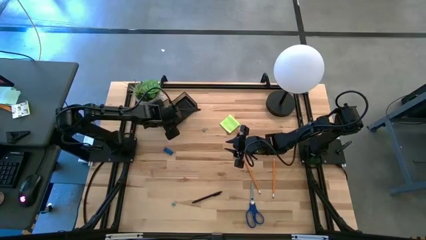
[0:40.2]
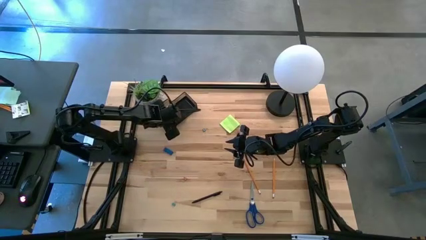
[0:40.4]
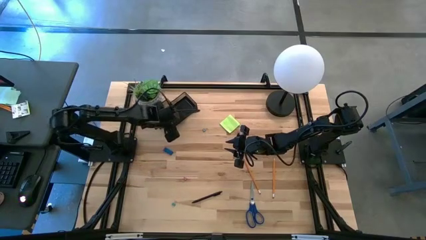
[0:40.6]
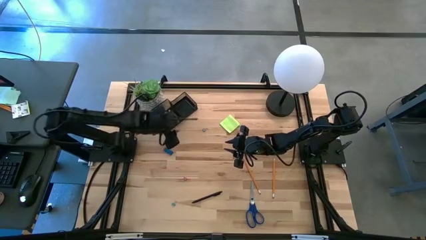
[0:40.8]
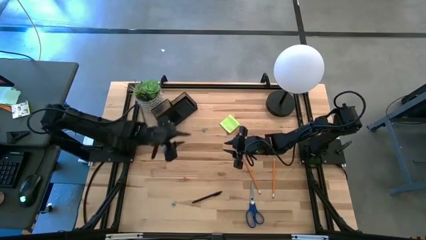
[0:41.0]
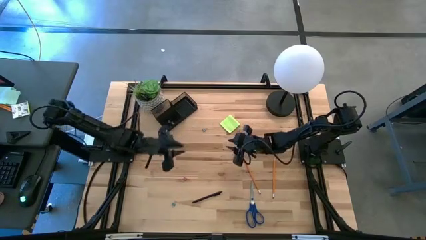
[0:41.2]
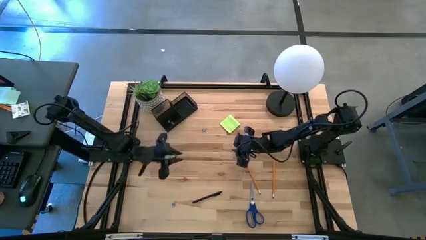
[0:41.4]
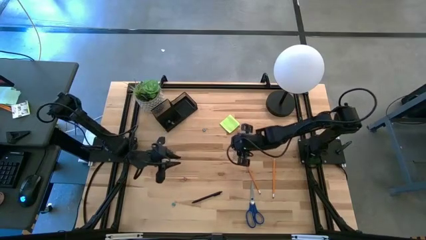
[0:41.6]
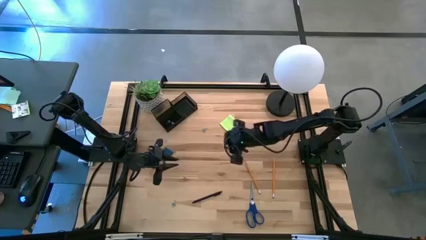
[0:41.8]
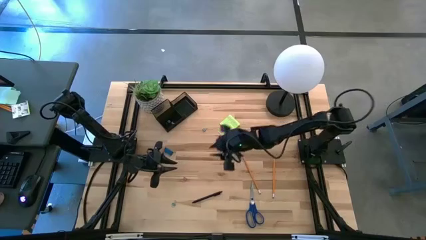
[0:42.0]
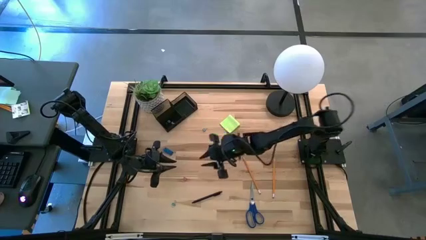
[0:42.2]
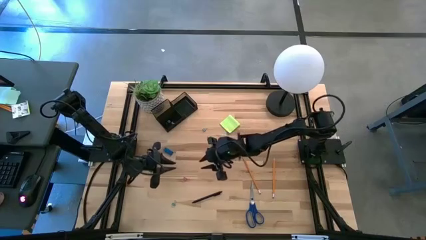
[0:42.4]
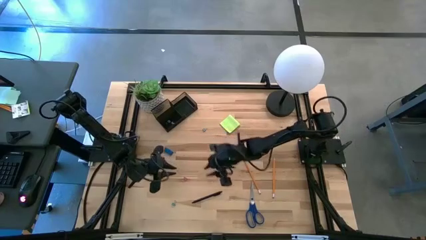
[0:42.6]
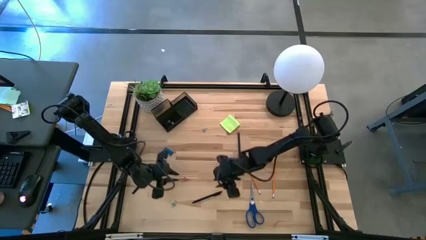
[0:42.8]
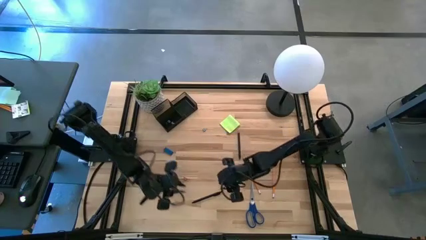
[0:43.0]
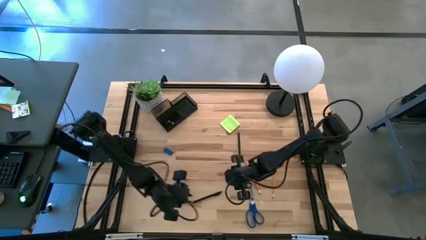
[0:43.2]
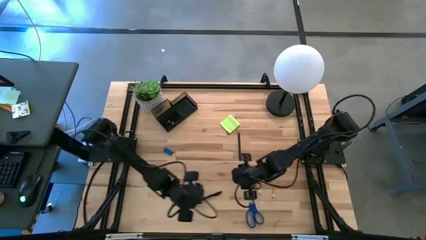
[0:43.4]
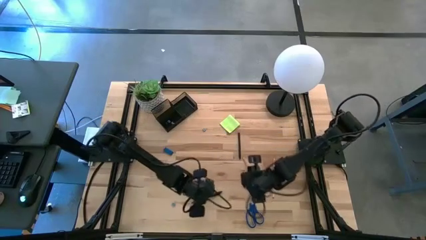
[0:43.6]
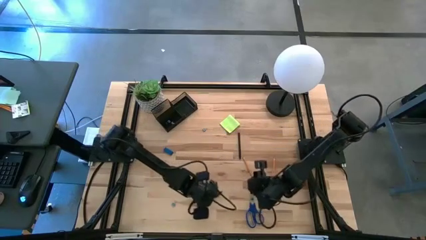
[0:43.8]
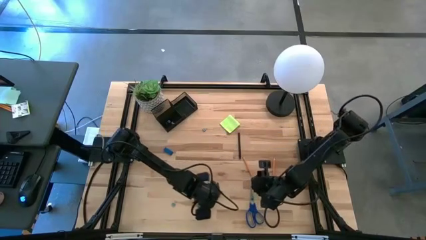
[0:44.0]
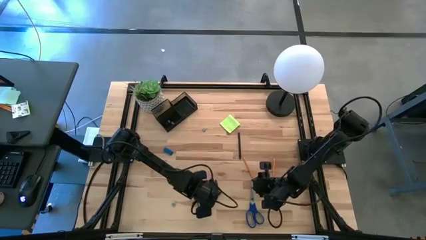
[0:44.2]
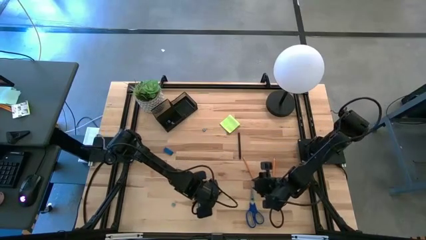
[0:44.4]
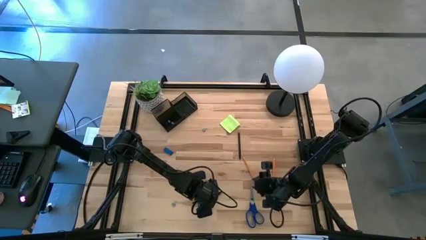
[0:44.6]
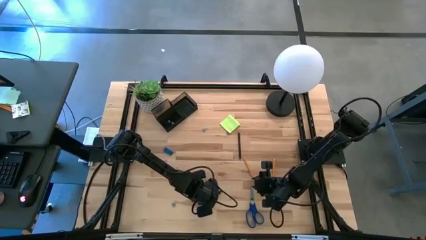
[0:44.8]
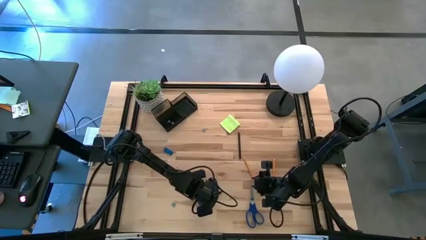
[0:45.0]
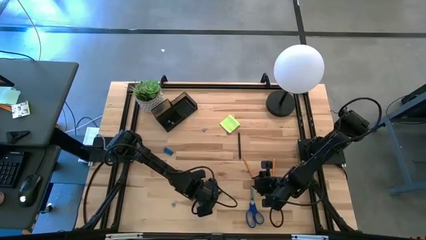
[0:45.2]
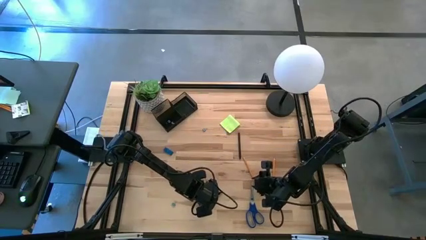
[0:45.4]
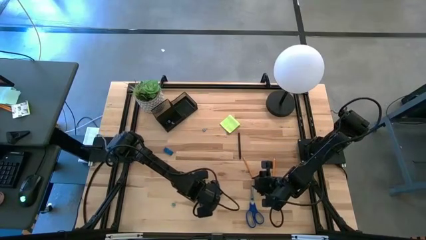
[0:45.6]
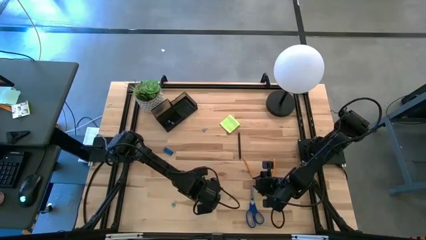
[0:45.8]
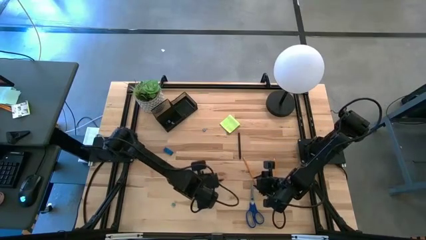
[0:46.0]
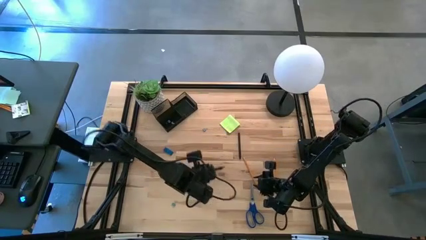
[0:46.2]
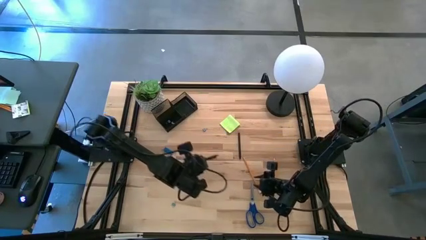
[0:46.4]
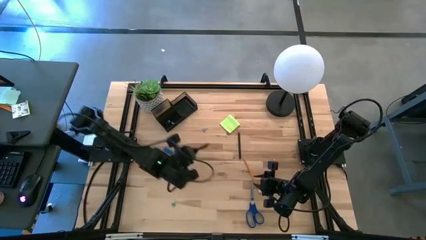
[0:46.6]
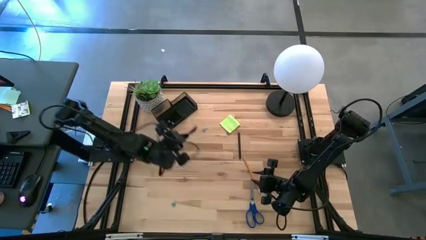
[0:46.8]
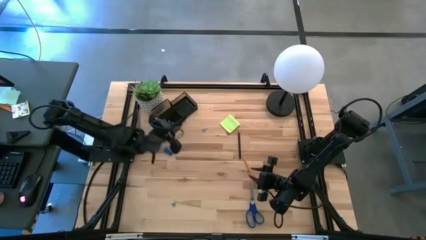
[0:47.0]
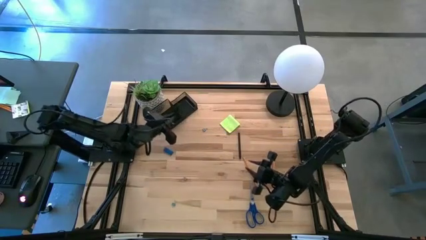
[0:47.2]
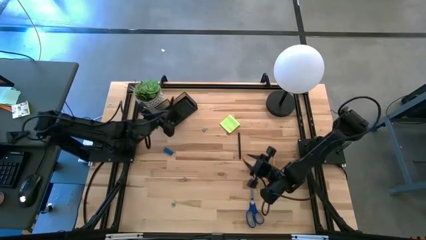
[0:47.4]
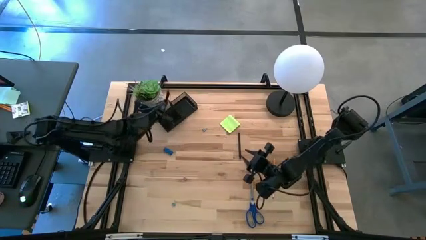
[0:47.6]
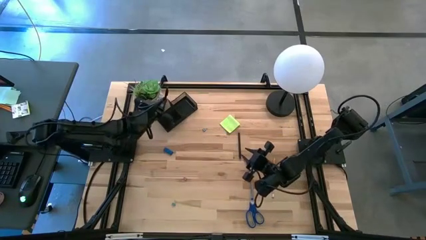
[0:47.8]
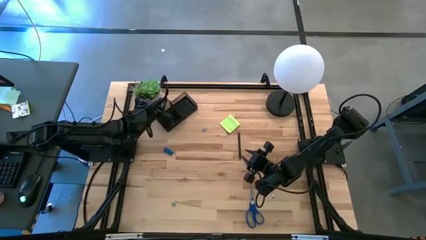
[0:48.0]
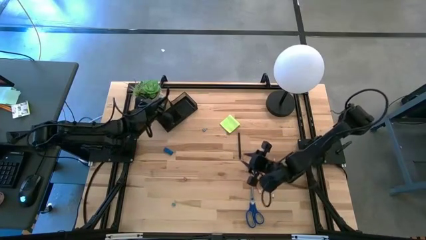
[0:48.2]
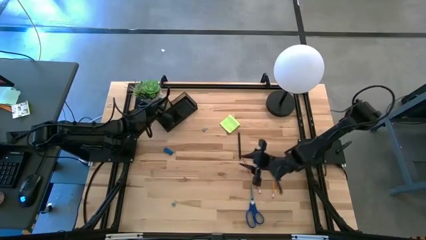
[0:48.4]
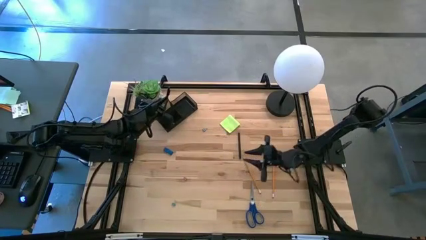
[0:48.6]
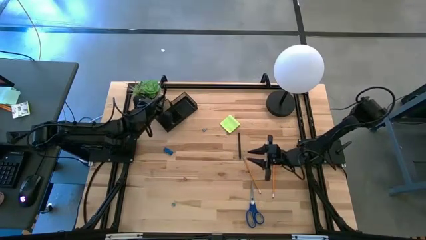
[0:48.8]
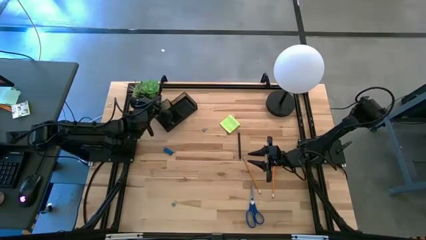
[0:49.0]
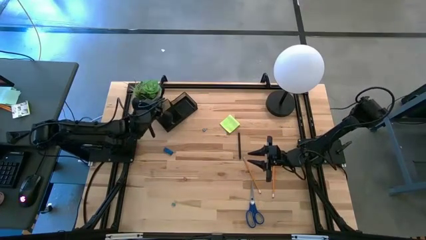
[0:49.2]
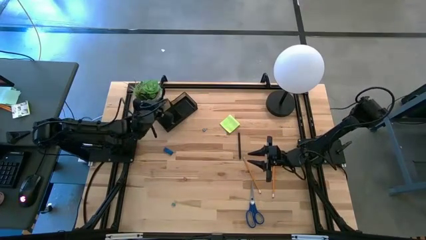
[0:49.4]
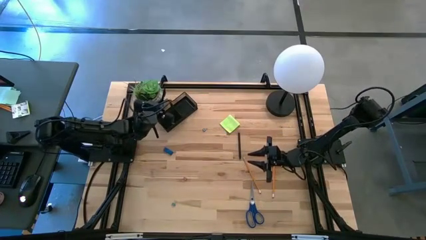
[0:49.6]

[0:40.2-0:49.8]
Task: Pick and place office supplies into organizer
Put the bottom black pen into the desk organizer

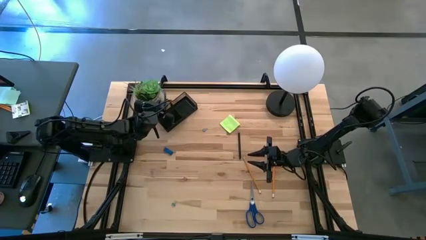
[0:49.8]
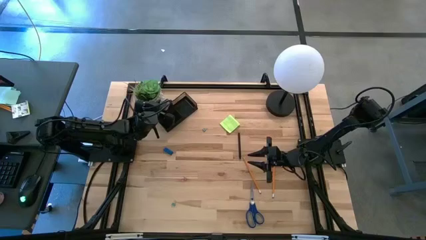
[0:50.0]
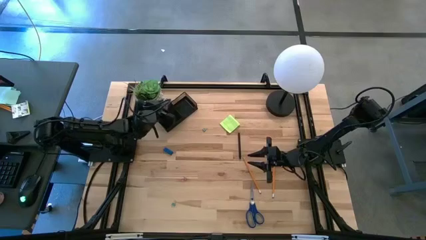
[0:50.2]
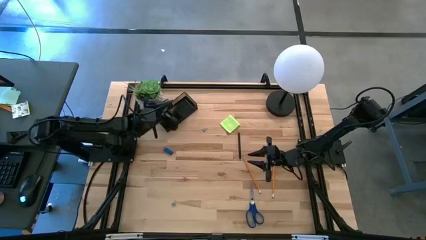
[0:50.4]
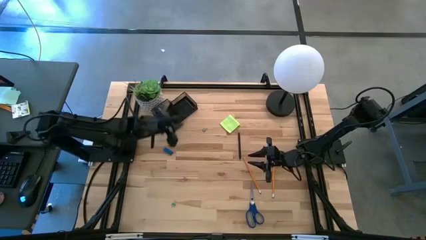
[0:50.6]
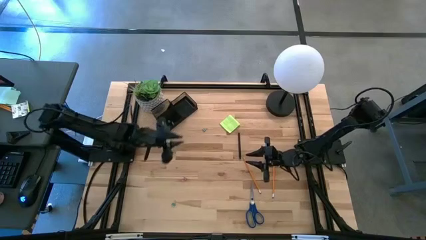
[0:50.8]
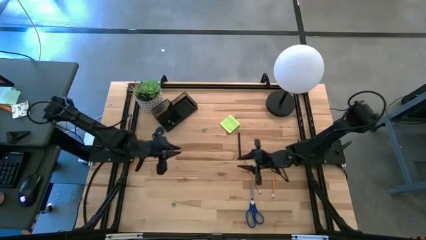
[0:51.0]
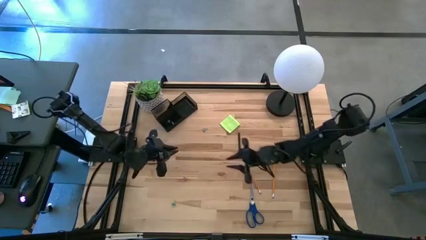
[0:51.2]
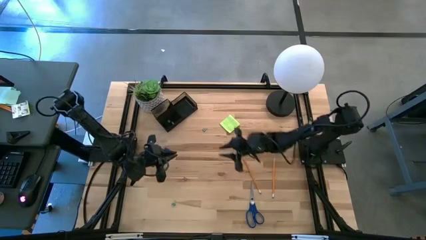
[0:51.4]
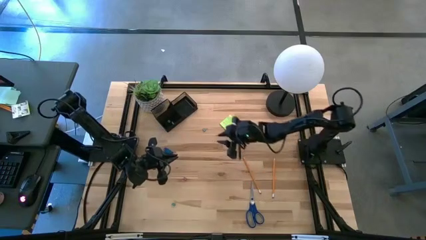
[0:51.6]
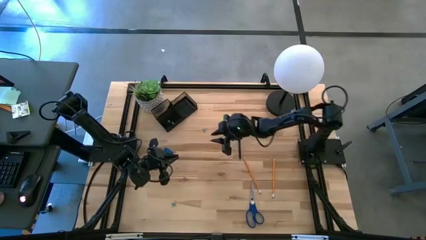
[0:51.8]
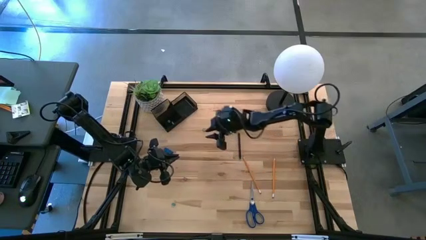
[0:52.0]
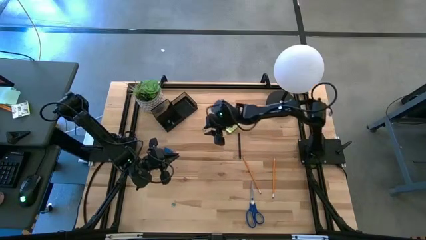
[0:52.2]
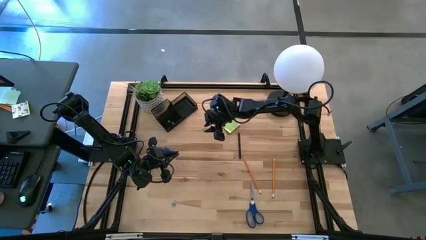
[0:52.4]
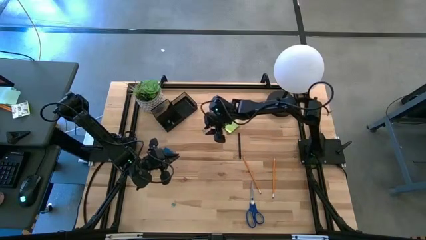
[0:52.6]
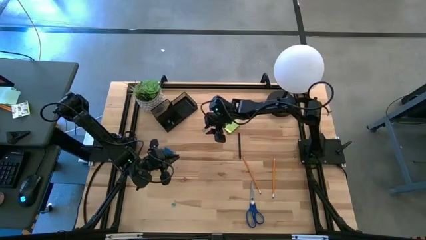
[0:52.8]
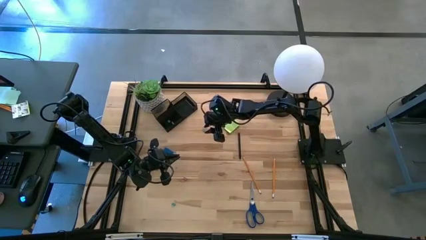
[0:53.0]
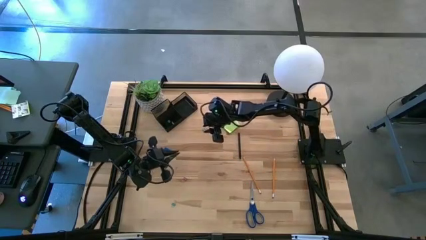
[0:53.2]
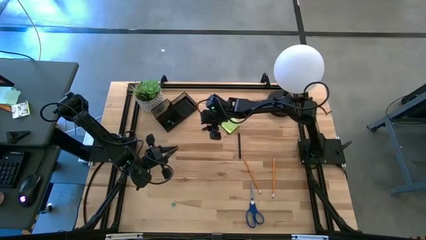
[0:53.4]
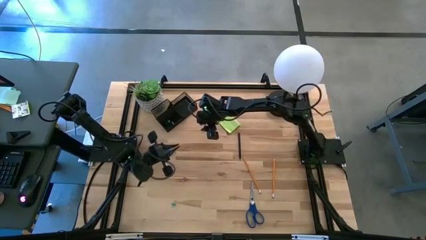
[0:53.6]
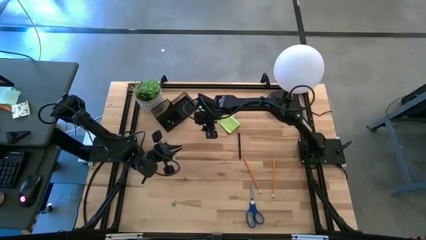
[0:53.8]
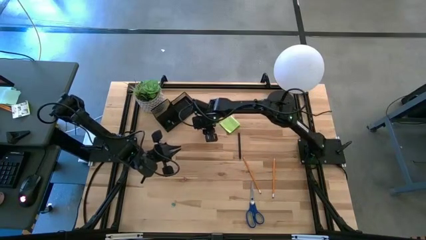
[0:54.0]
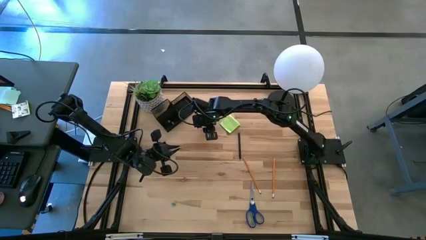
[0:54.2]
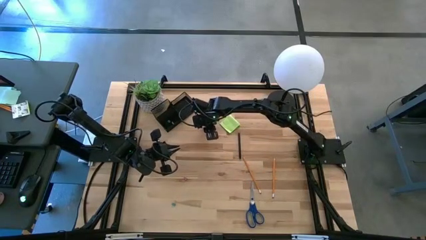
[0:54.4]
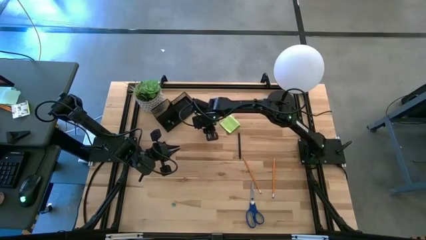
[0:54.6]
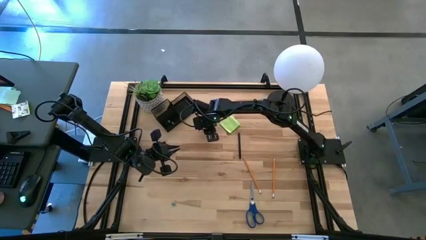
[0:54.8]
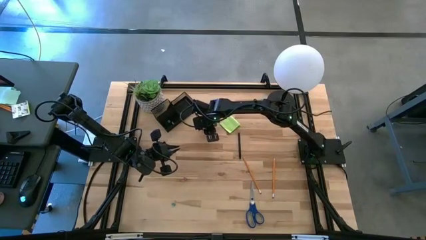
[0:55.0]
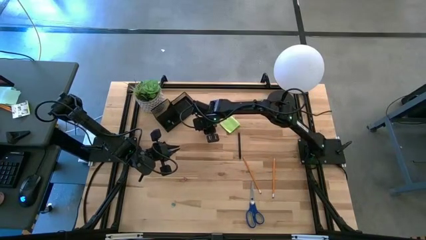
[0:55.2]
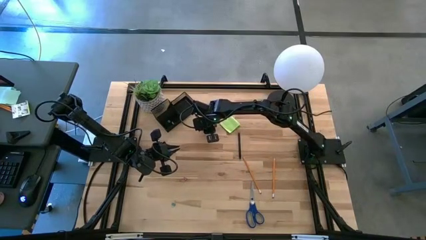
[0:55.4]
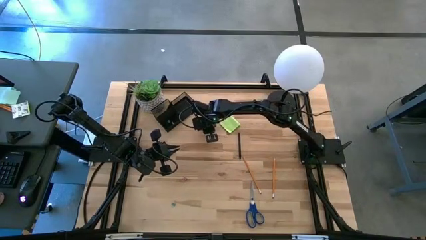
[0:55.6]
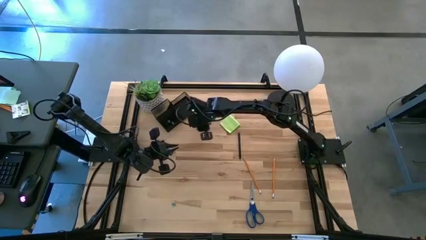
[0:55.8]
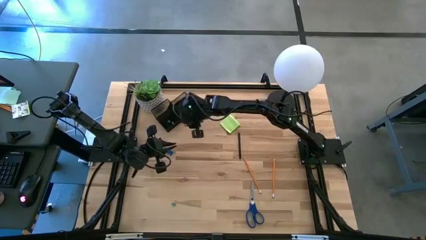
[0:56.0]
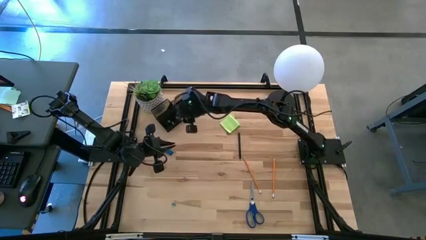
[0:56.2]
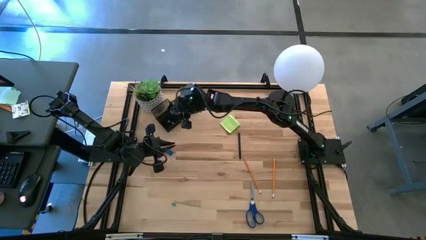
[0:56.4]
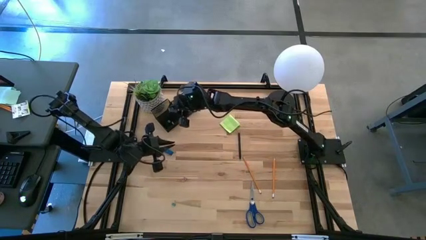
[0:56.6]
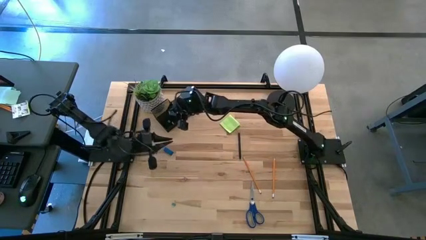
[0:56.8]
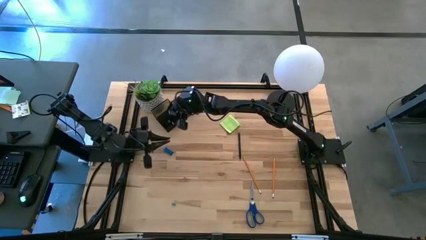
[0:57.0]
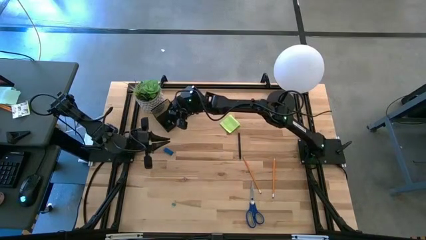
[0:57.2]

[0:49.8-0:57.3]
Put the top blue binder clip into the desk organizer
